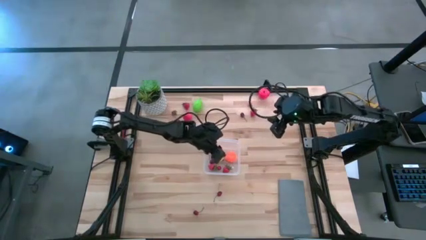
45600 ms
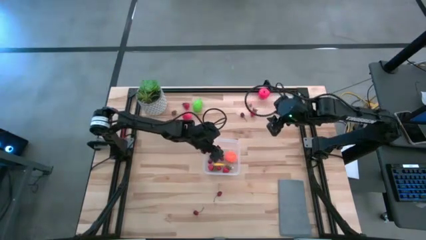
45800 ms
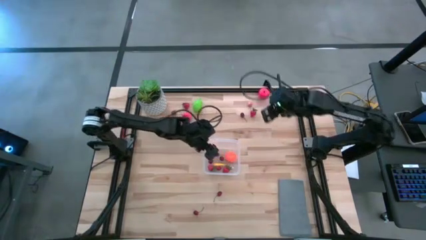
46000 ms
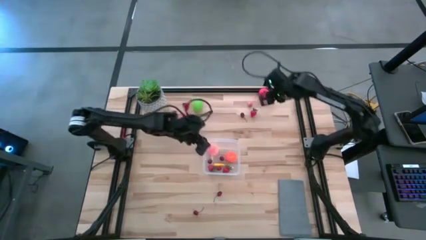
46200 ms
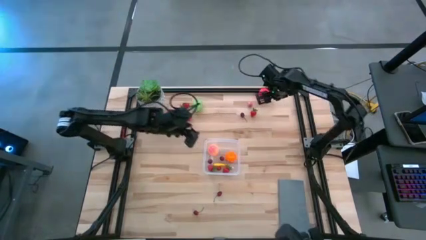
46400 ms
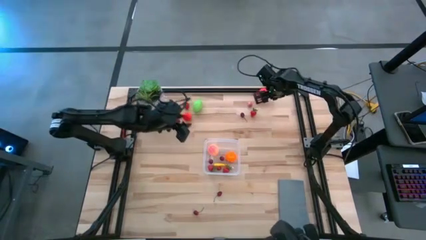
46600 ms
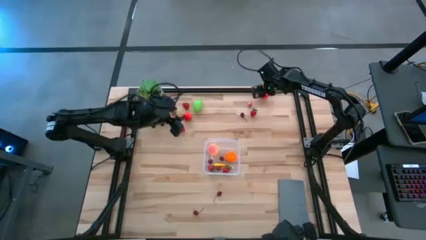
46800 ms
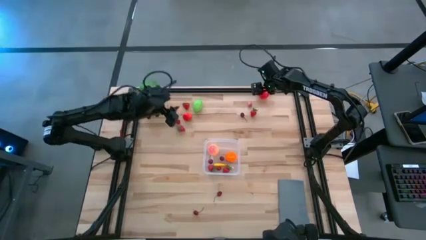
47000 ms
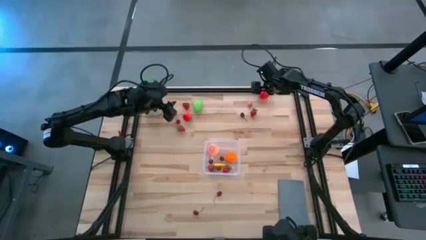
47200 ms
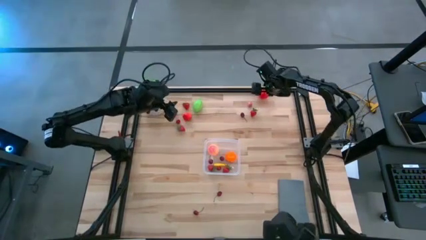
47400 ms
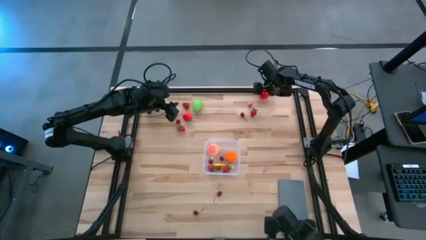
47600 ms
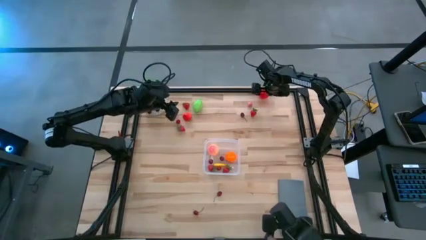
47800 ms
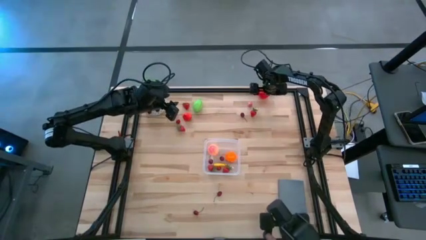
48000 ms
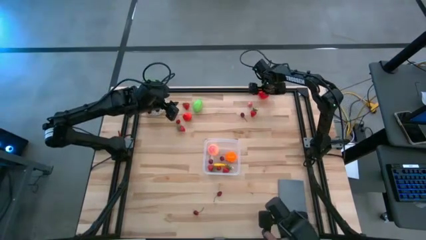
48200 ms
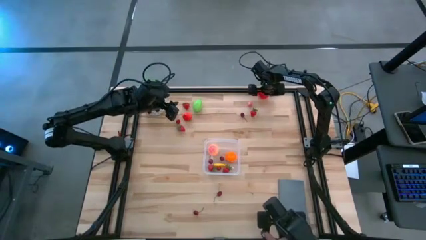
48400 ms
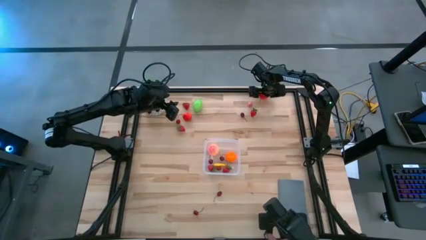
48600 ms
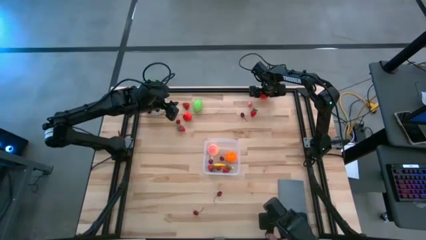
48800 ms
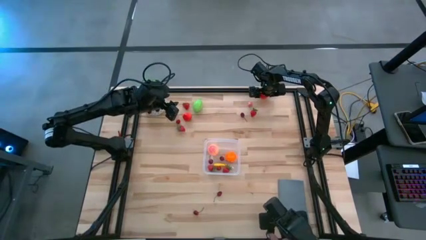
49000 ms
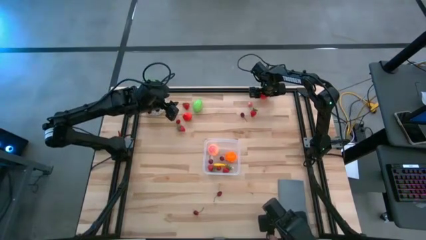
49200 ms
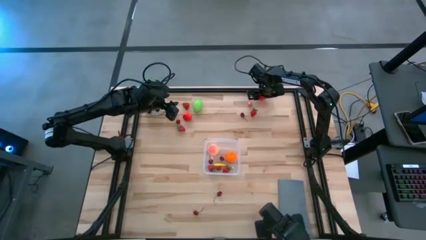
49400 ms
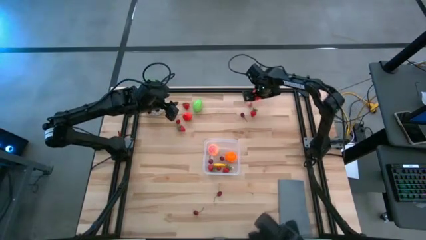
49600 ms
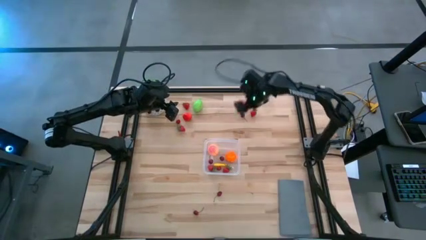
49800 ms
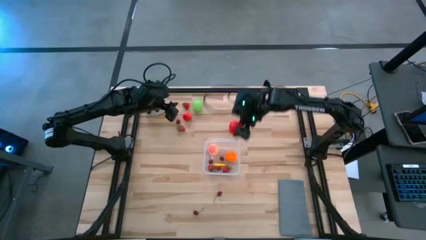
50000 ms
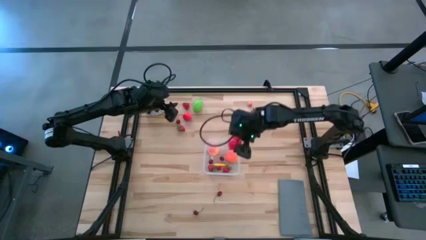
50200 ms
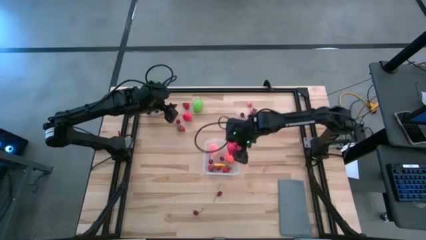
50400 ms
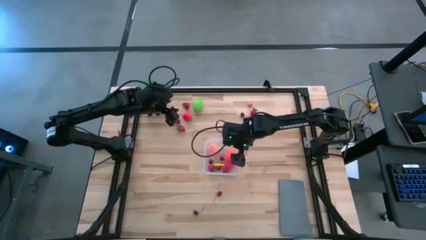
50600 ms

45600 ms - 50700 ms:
Task: Pick and placing Produce into tupperware
Put the red apple into the transparent container

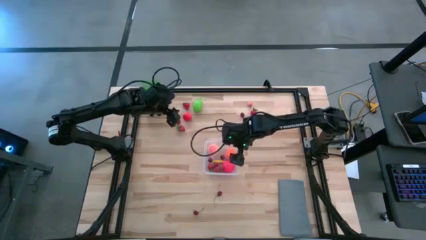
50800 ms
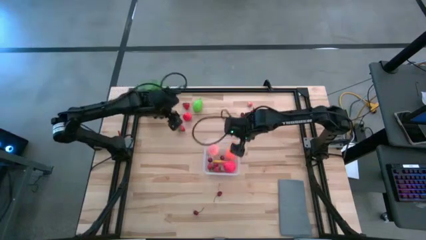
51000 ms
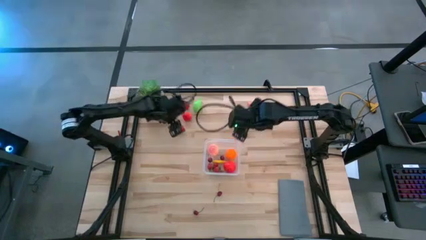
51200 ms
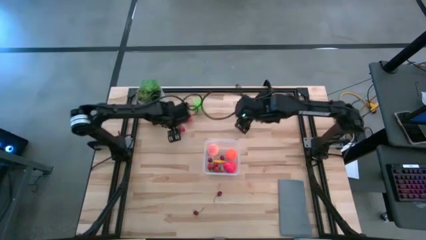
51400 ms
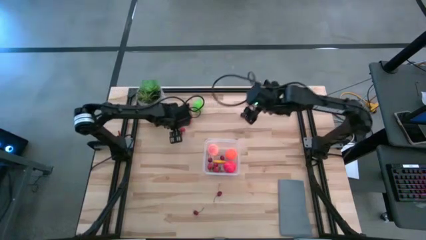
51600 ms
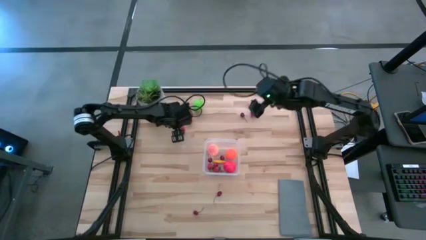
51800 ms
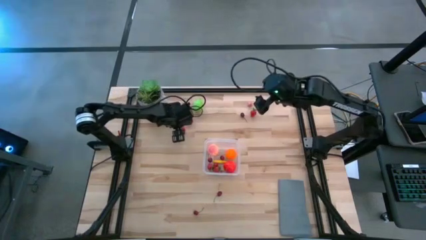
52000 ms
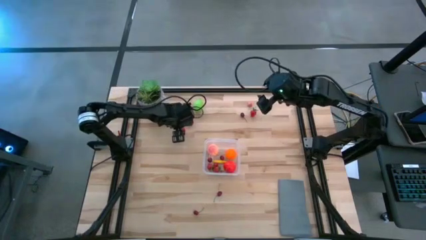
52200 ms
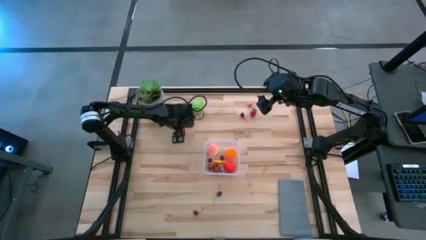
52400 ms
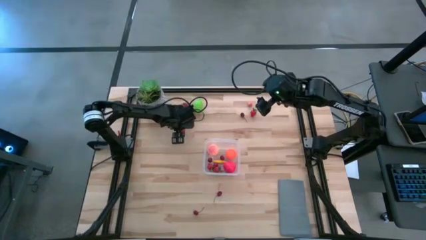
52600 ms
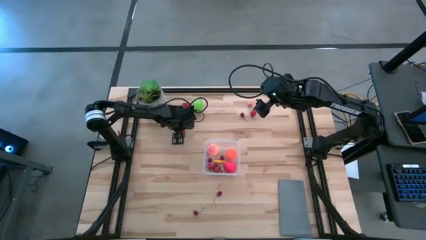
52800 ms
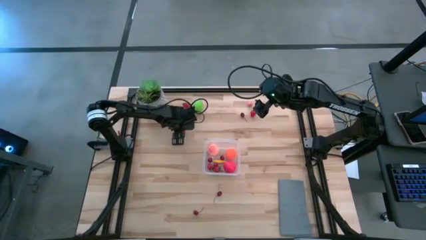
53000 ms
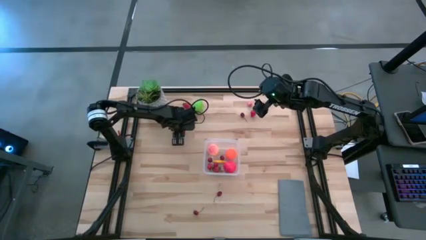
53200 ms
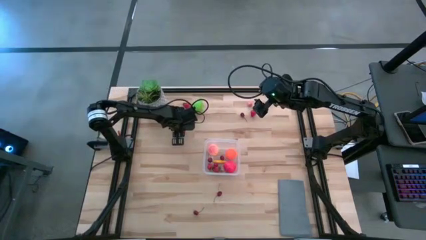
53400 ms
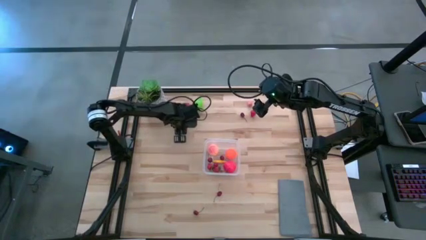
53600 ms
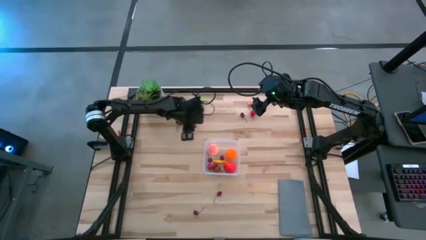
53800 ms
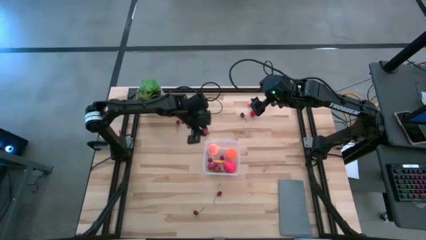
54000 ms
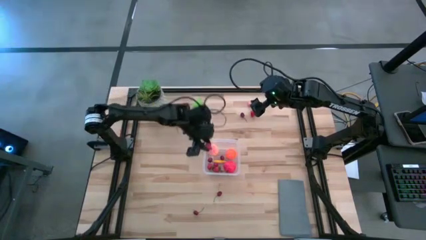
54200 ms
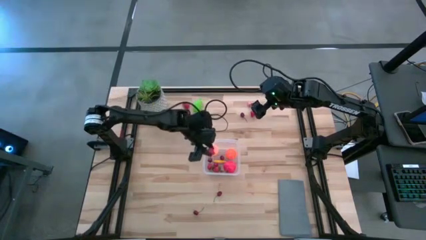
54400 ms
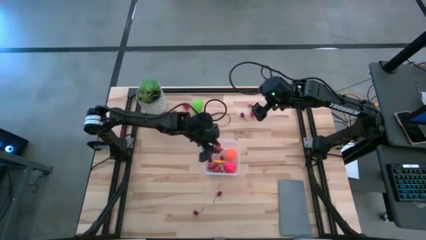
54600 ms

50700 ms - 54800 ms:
Put the red strawberry into the transparent container

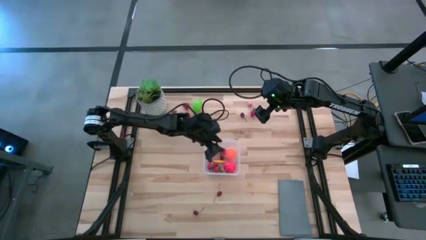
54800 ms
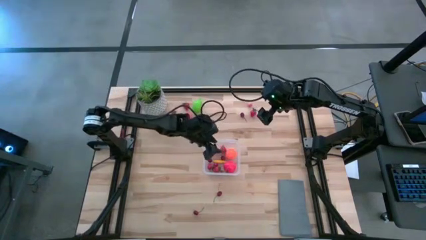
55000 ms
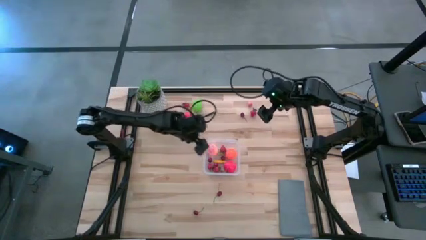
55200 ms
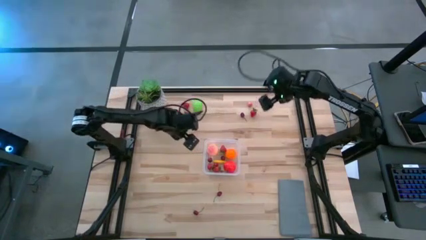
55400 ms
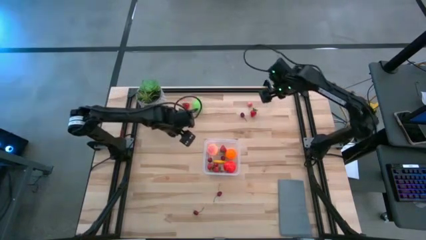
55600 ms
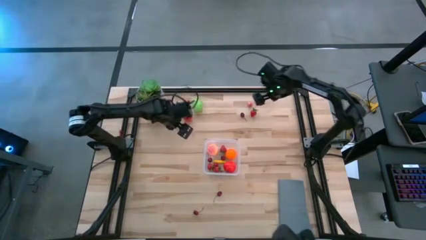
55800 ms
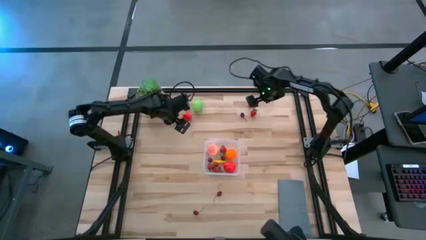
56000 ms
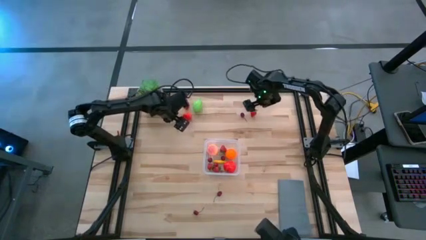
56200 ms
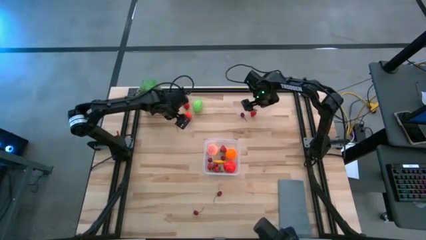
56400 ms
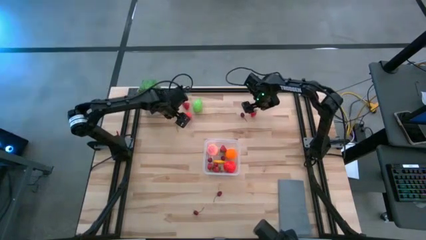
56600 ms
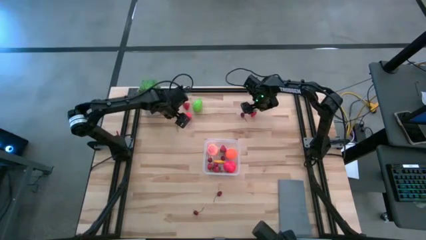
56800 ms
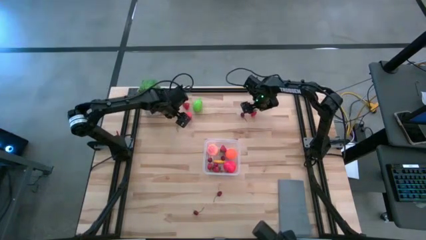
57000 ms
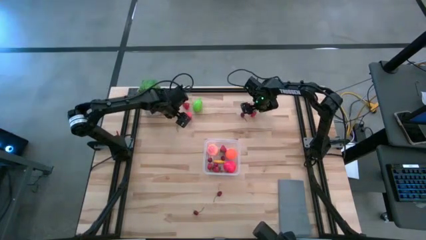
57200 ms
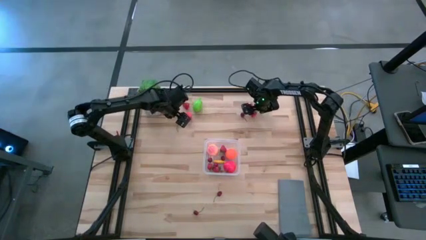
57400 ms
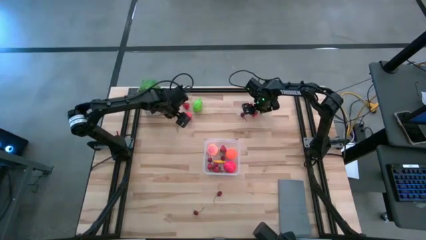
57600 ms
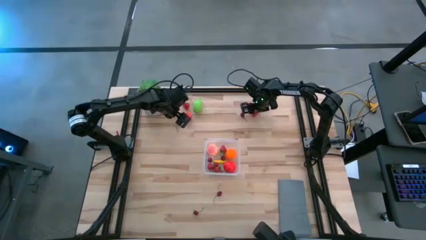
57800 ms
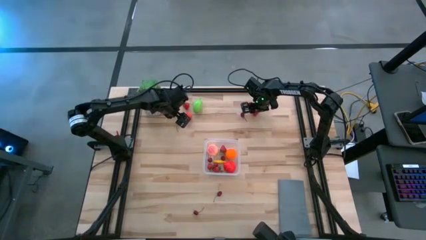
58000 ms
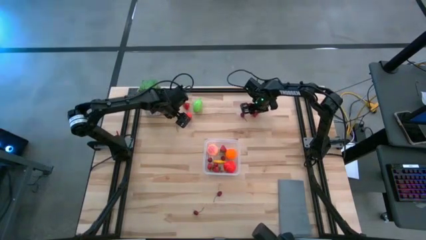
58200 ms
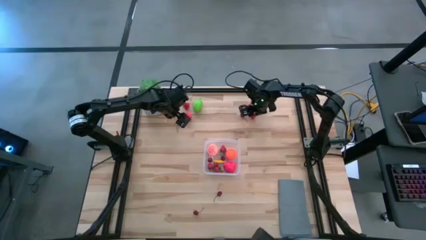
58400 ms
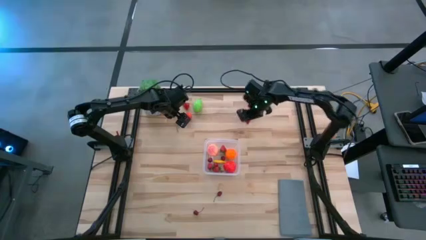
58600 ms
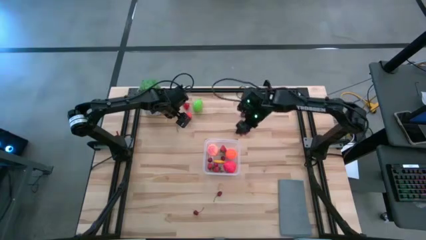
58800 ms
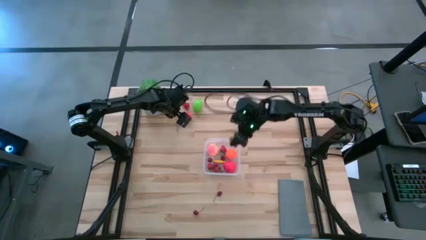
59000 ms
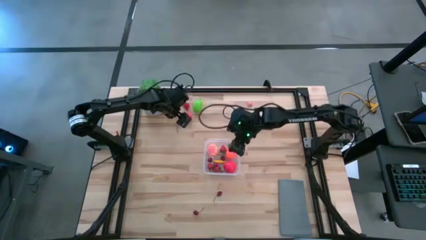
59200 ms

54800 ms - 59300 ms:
Put the red strawberry into the transparent container

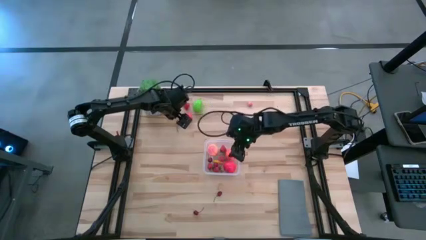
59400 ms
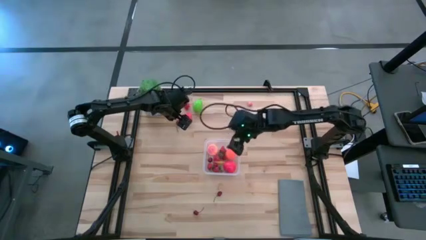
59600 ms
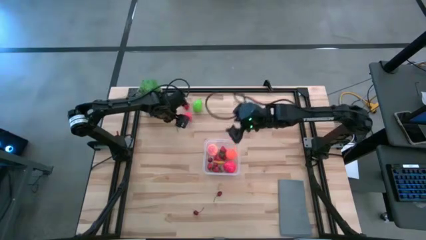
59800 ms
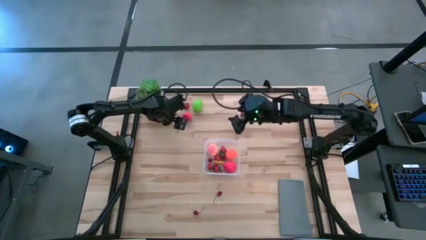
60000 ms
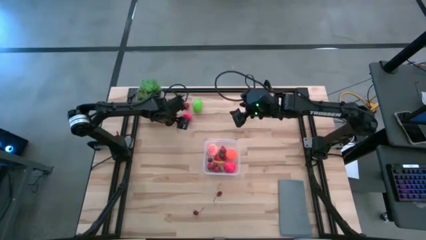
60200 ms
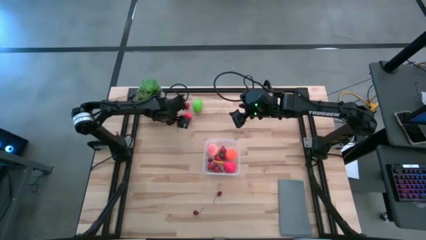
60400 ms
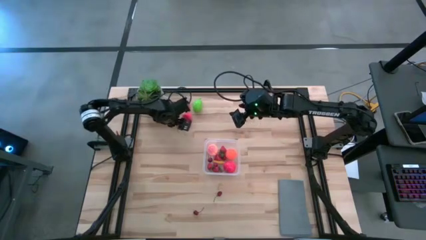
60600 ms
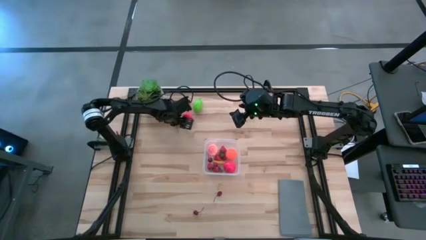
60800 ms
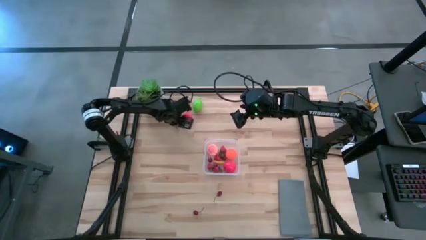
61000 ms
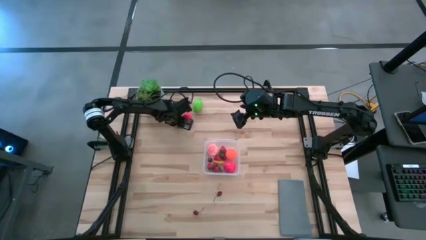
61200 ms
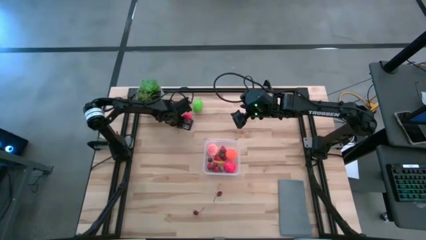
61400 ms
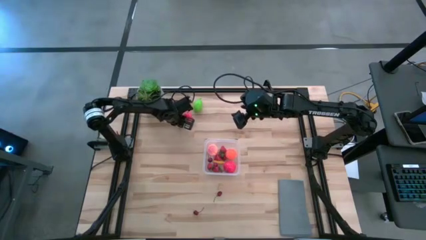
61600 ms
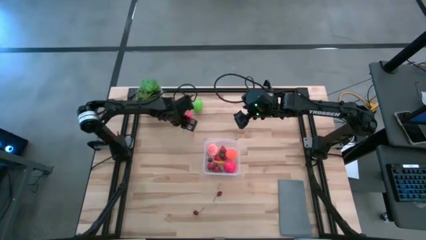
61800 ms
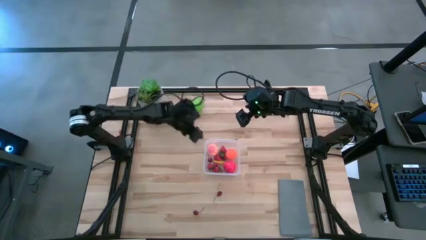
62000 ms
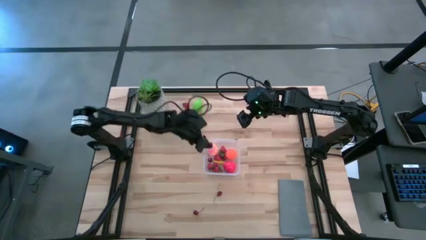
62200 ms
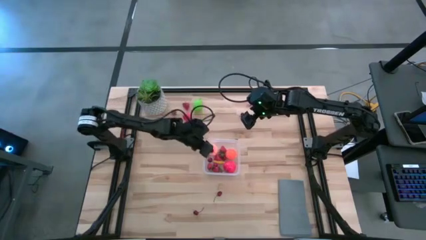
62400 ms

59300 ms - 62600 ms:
Put the red cherry into the transparent container
